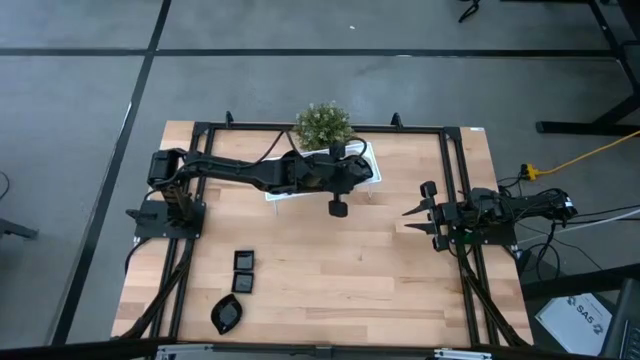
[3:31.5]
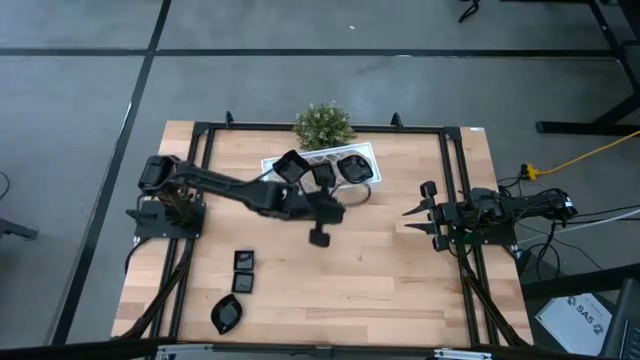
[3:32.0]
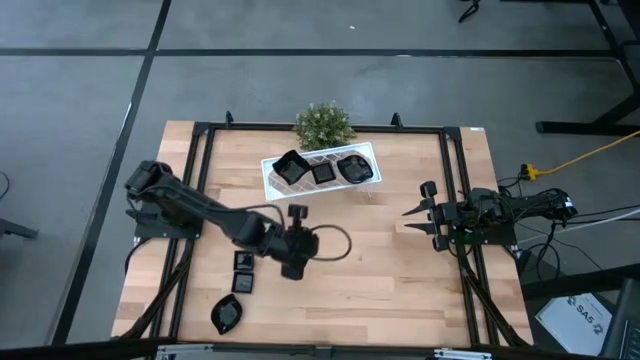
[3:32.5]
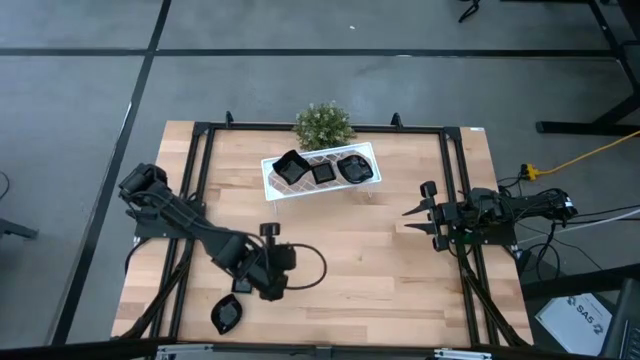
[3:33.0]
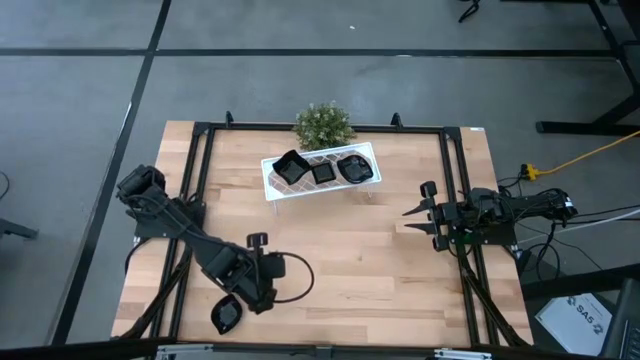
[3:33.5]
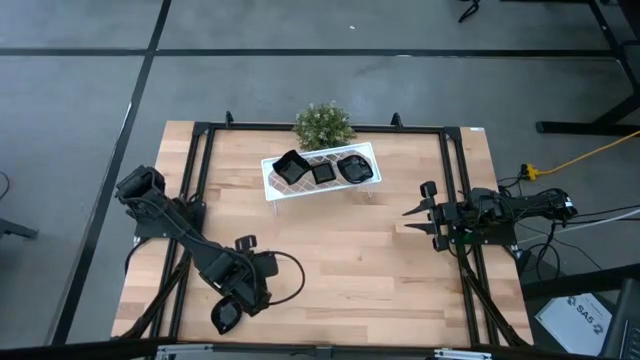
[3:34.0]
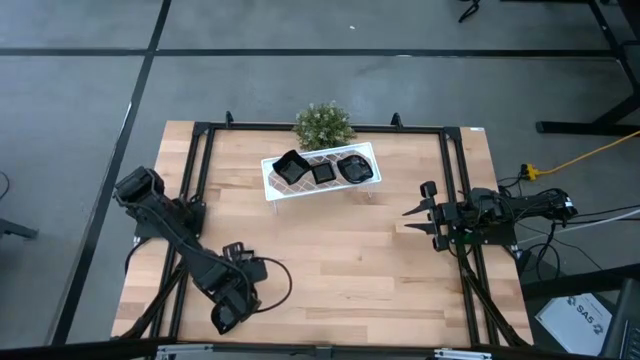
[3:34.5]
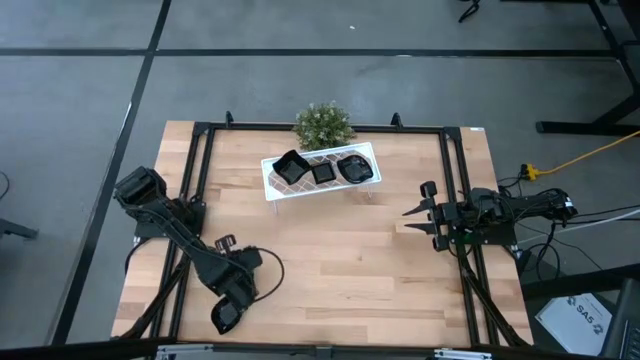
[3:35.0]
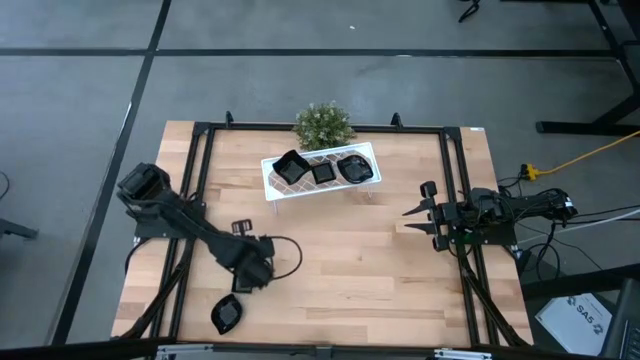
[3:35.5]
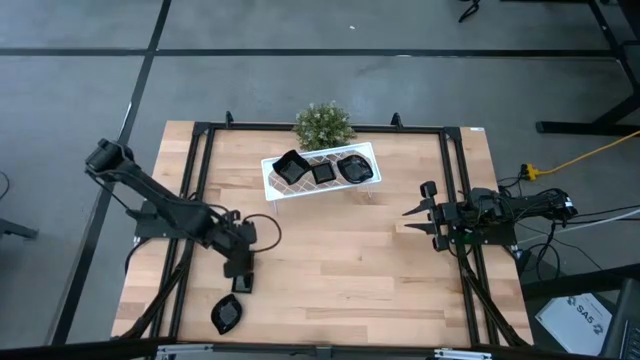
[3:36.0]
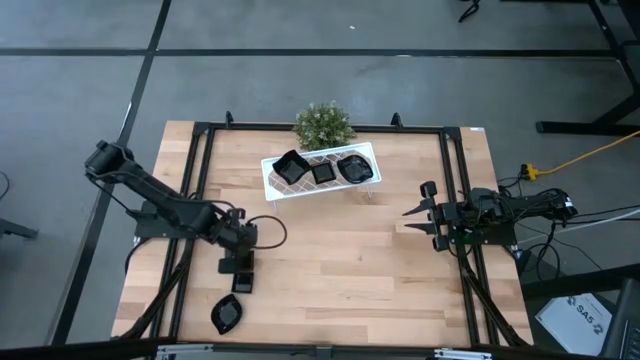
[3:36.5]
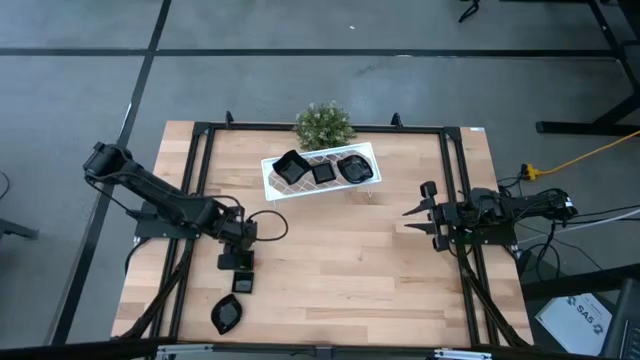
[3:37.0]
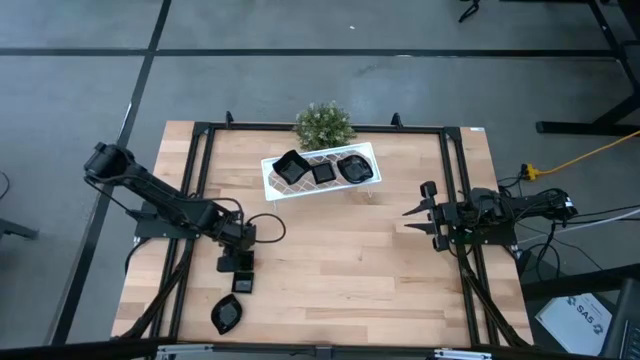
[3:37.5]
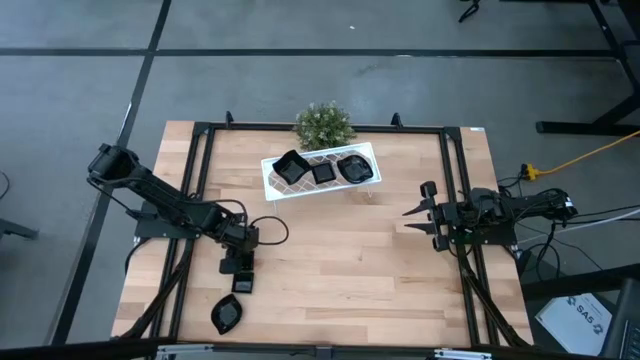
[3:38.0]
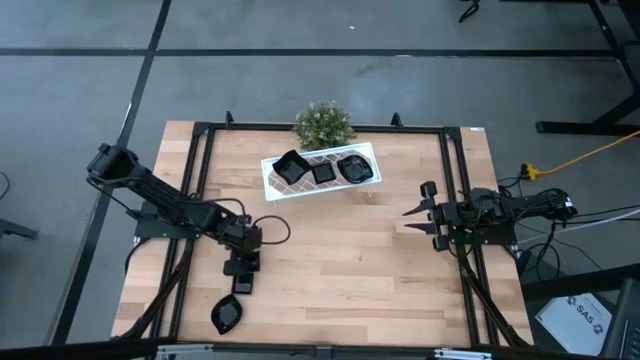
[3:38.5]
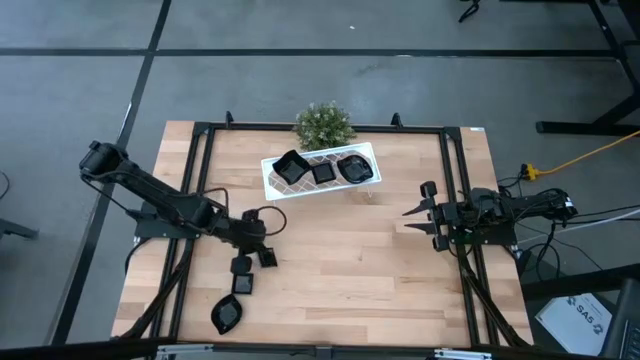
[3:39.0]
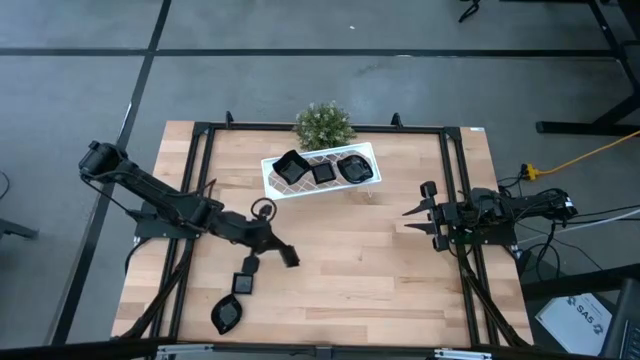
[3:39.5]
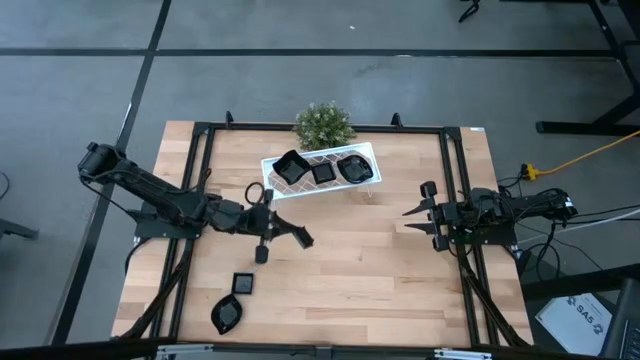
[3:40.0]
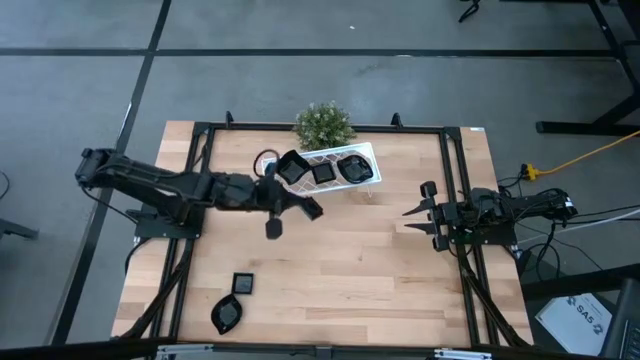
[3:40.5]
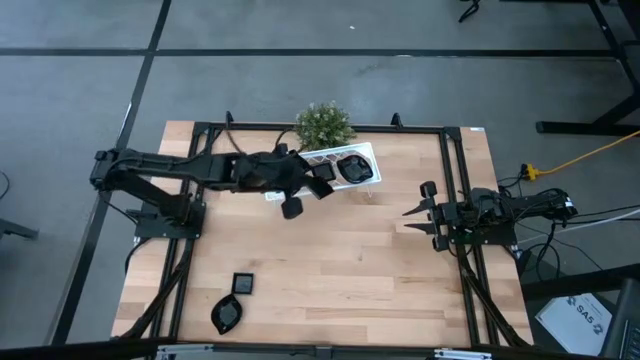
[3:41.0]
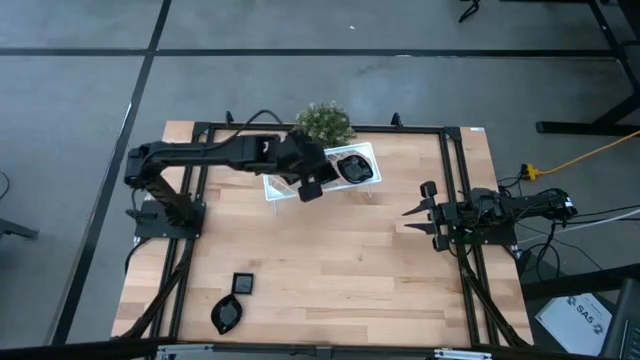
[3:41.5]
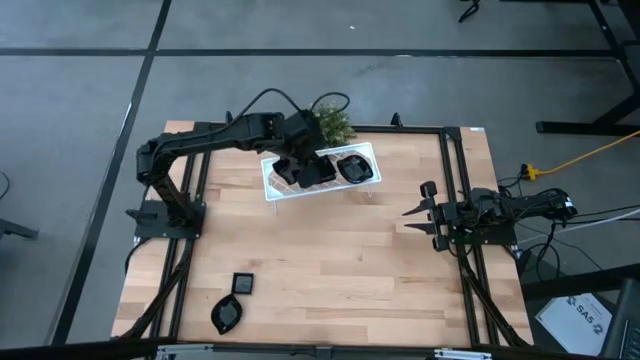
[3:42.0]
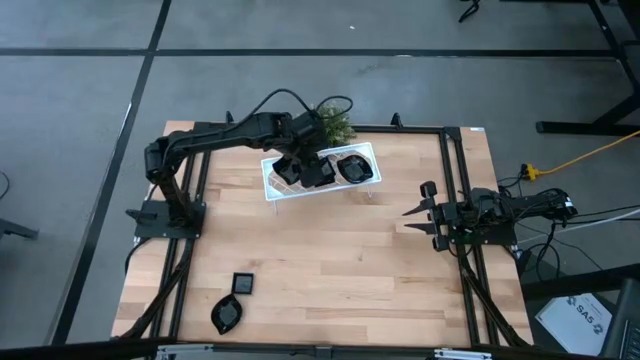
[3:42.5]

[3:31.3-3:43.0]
Task: Pick & Place Mini shaped plates
Stack the square plate on top of the square plate on the shelf

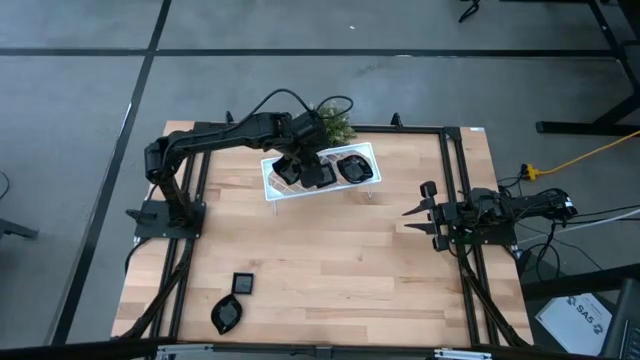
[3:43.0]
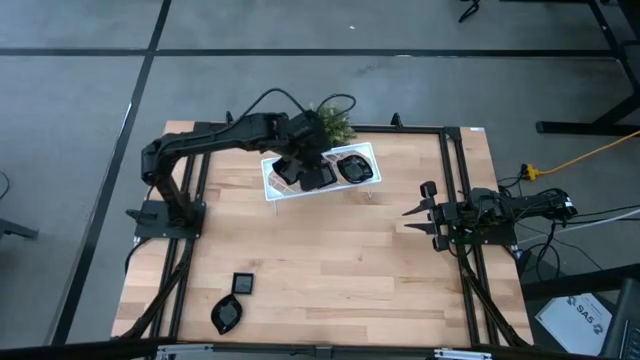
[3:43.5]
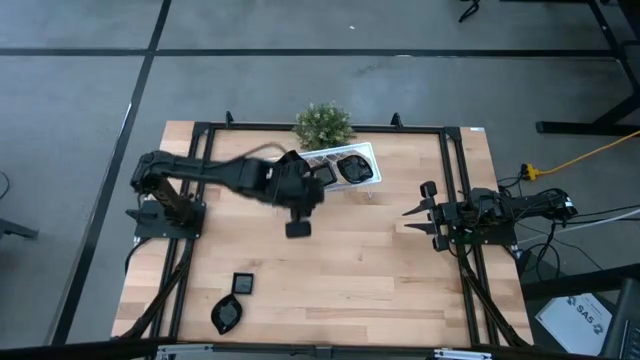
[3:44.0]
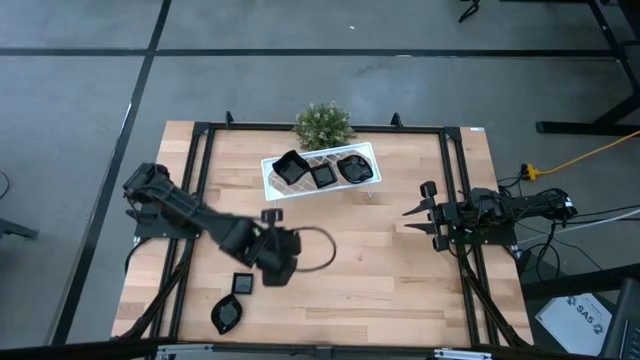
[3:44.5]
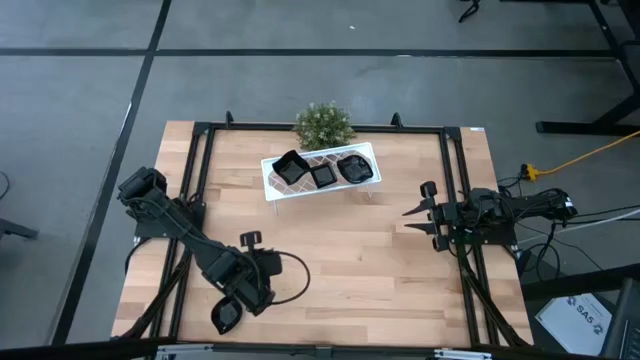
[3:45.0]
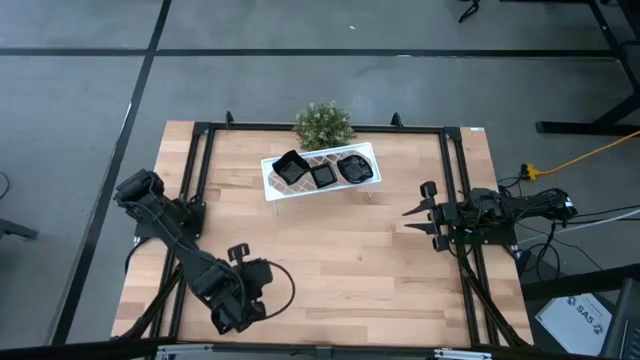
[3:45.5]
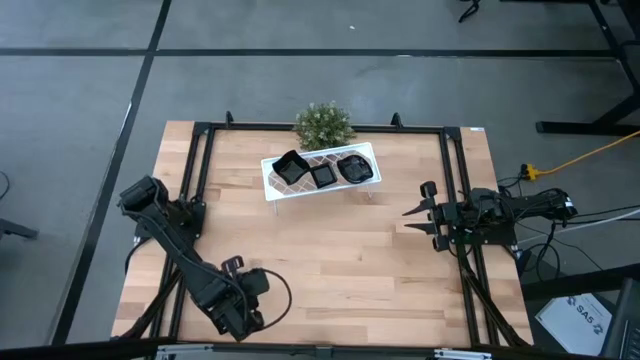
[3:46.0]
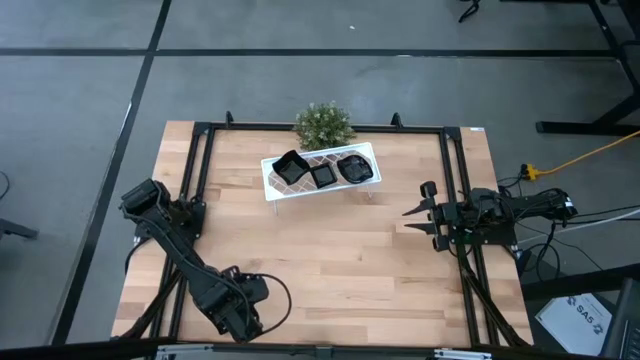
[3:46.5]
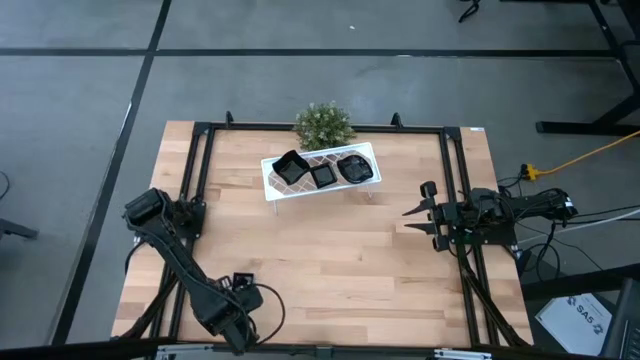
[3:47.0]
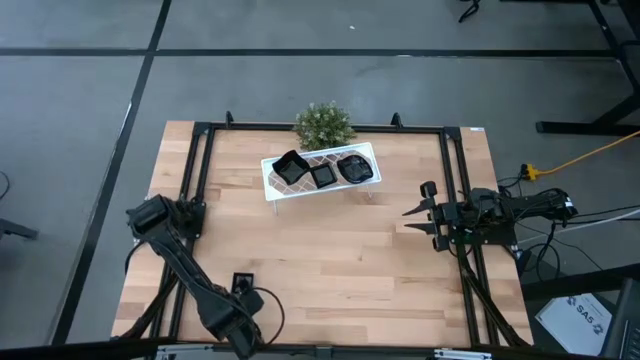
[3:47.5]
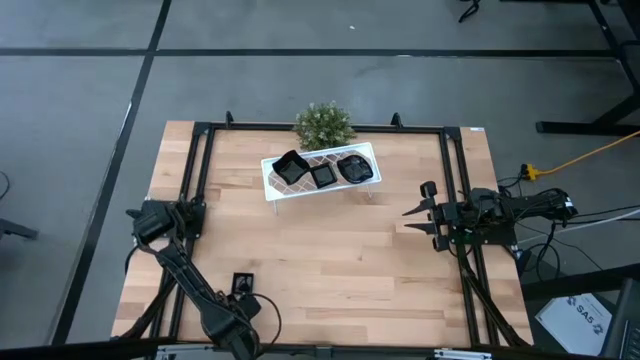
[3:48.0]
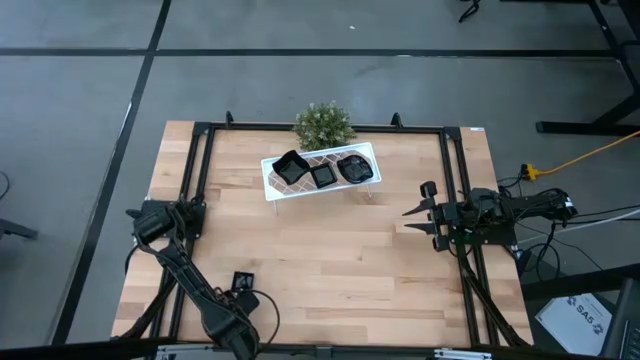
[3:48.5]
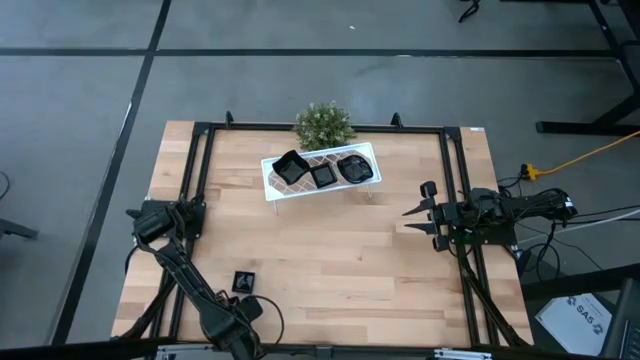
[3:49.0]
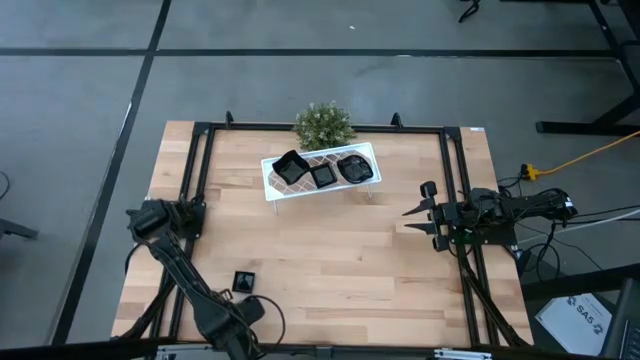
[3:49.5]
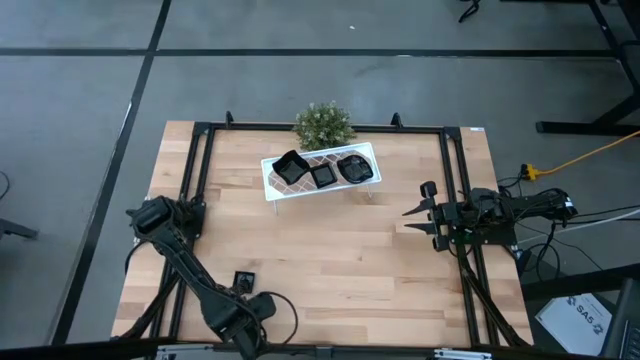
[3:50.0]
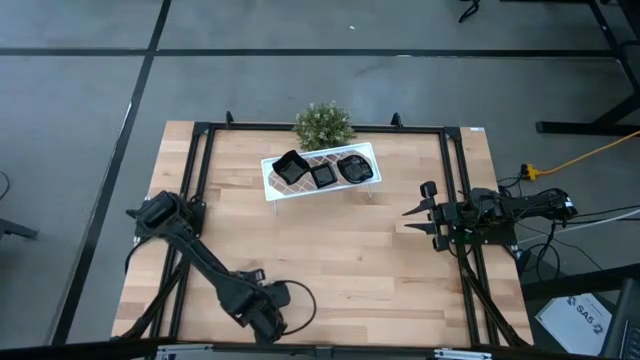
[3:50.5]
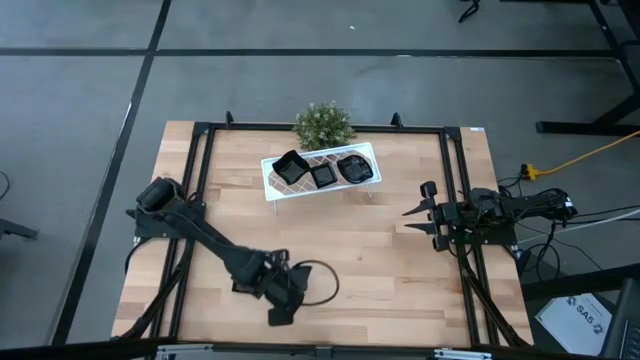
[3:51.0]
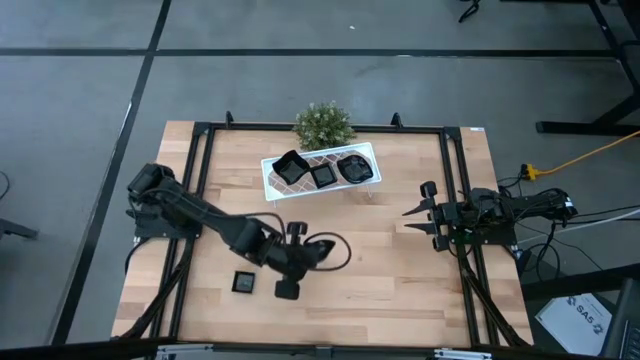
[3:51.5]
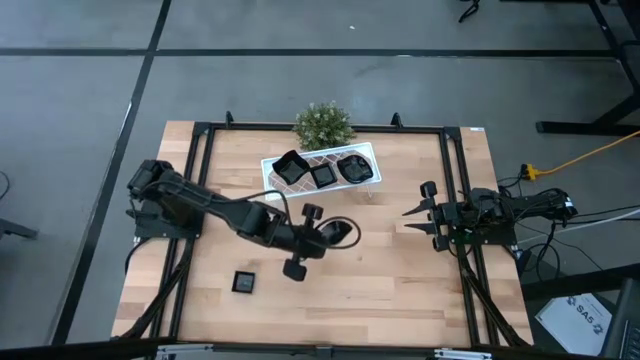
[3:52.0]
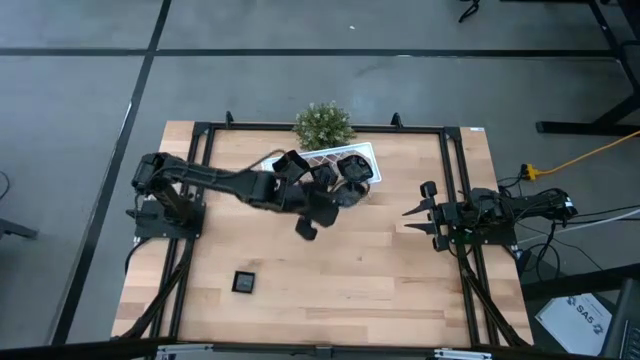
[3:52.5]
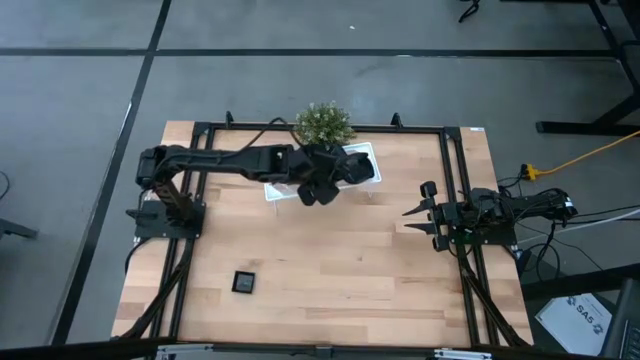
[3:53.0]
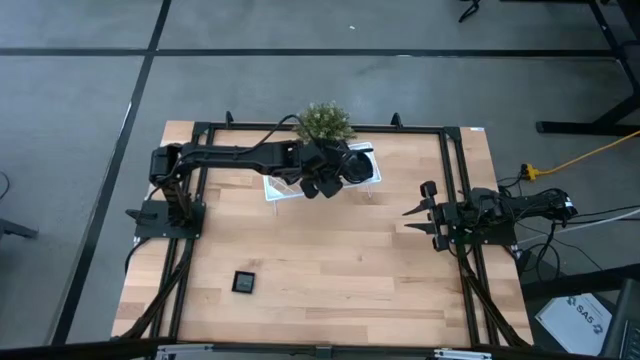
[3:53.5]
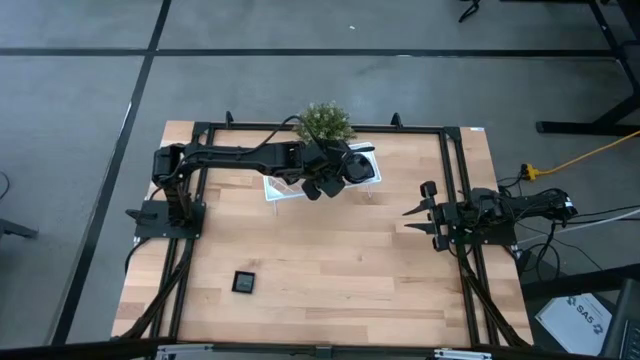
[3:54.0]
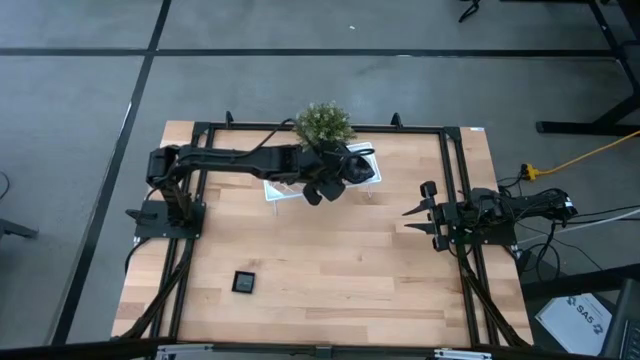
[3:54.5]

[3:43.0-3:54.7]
Stack the leaf-shaped plate on top of the leaf-shaped plate on the shelf
